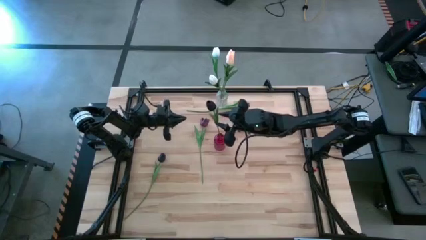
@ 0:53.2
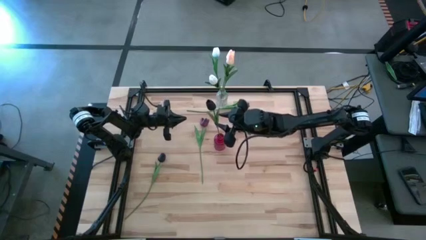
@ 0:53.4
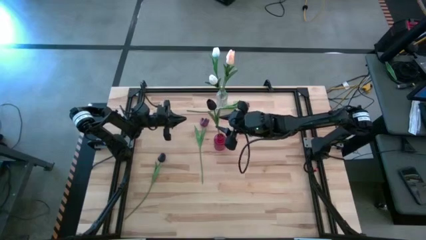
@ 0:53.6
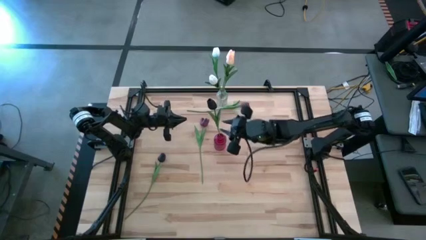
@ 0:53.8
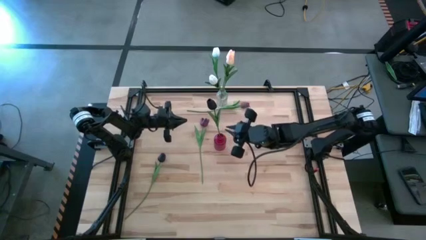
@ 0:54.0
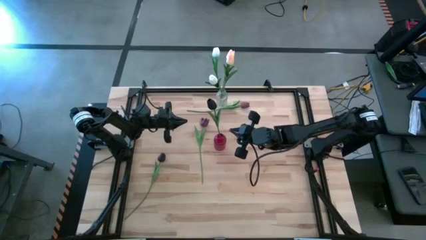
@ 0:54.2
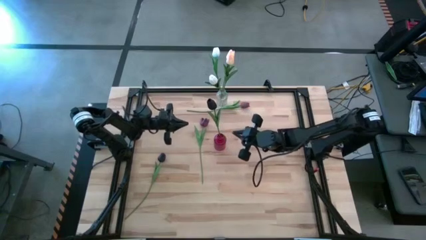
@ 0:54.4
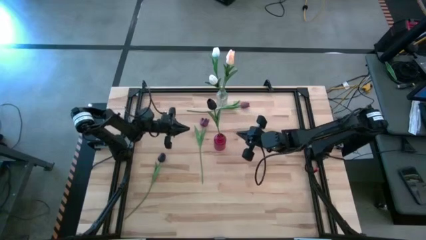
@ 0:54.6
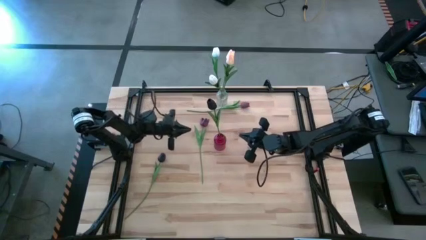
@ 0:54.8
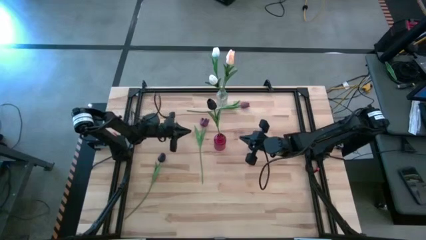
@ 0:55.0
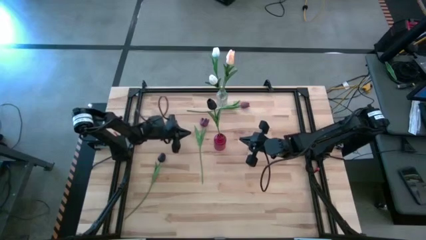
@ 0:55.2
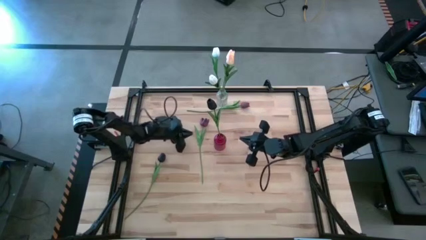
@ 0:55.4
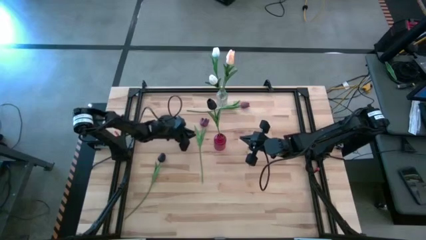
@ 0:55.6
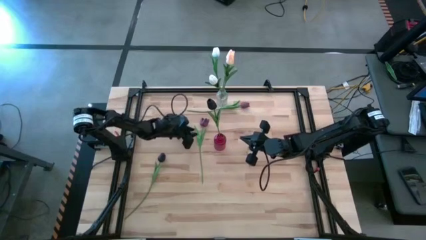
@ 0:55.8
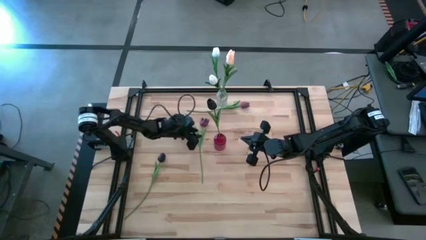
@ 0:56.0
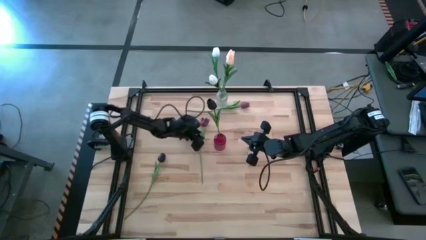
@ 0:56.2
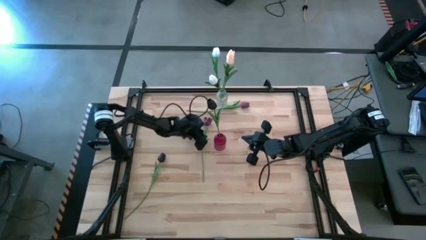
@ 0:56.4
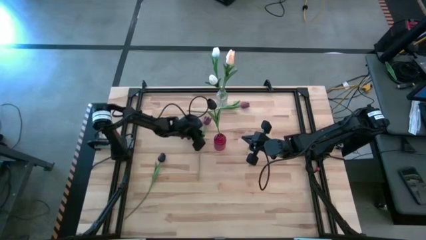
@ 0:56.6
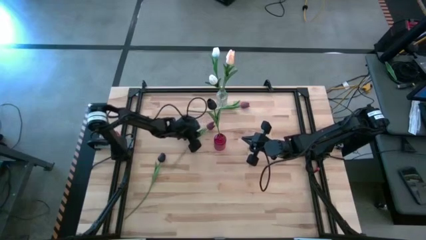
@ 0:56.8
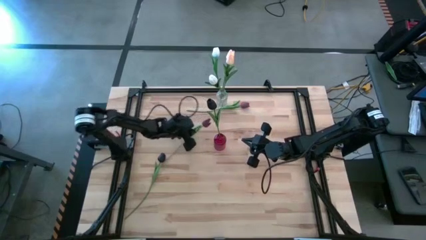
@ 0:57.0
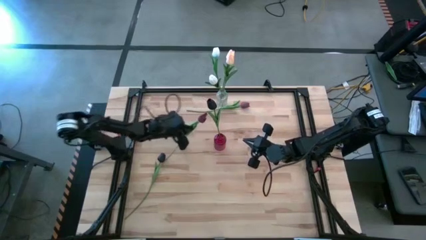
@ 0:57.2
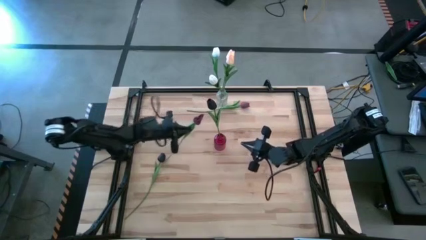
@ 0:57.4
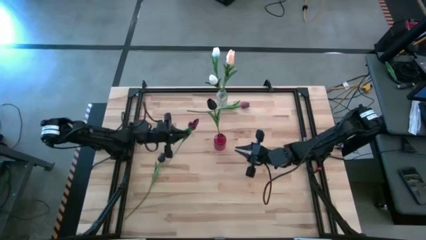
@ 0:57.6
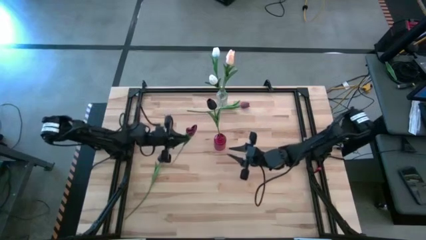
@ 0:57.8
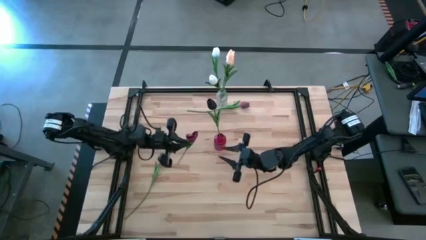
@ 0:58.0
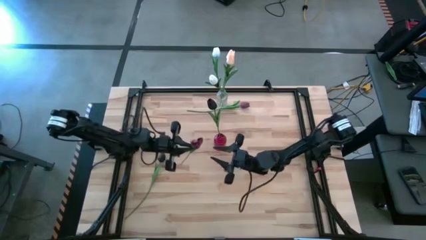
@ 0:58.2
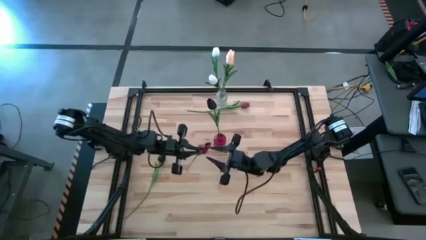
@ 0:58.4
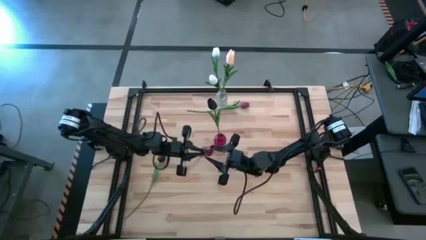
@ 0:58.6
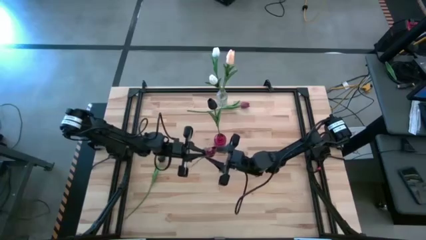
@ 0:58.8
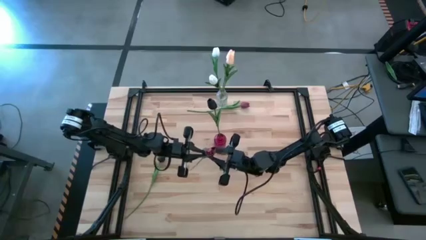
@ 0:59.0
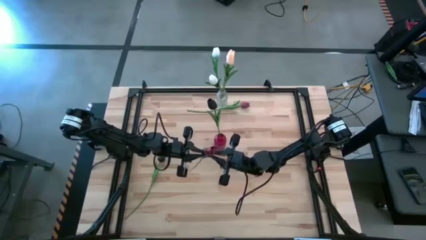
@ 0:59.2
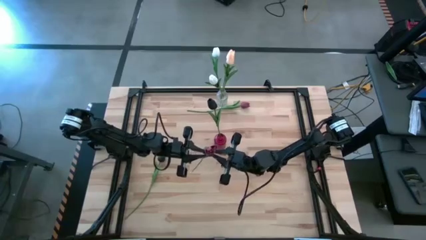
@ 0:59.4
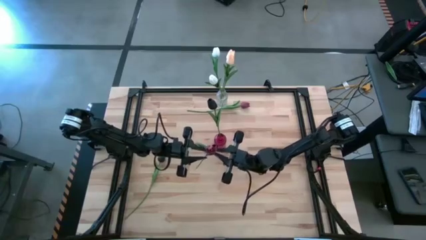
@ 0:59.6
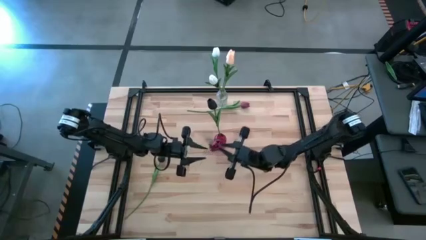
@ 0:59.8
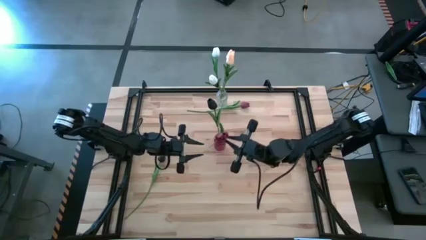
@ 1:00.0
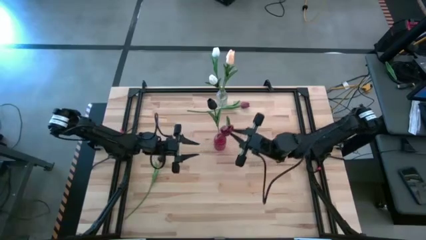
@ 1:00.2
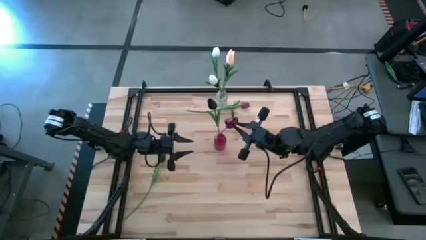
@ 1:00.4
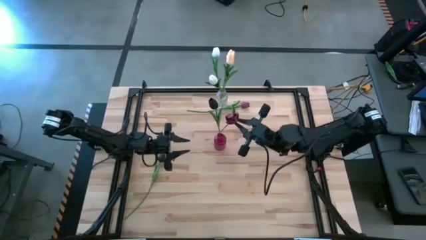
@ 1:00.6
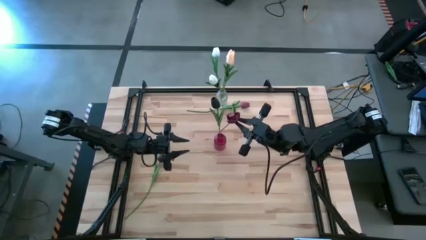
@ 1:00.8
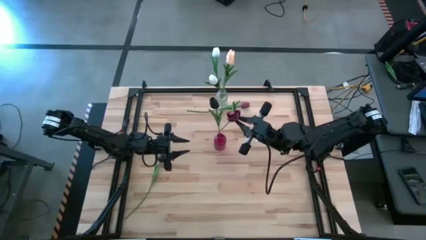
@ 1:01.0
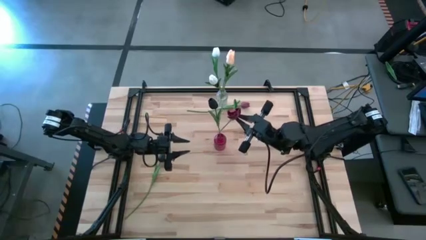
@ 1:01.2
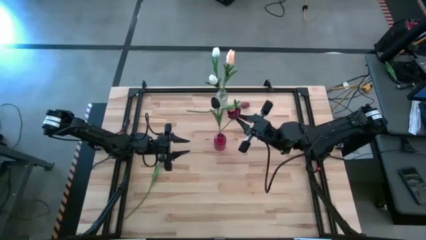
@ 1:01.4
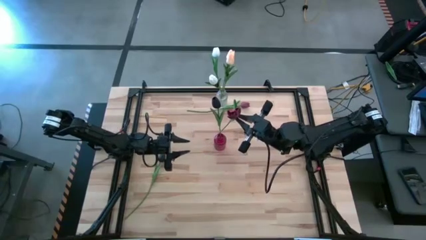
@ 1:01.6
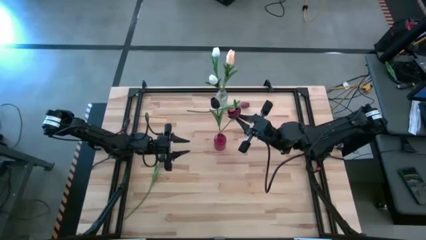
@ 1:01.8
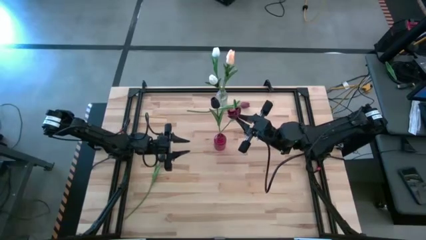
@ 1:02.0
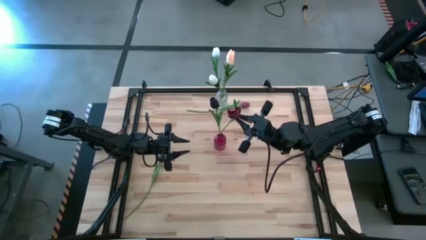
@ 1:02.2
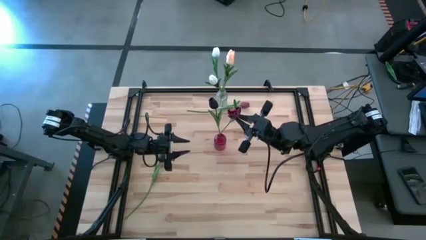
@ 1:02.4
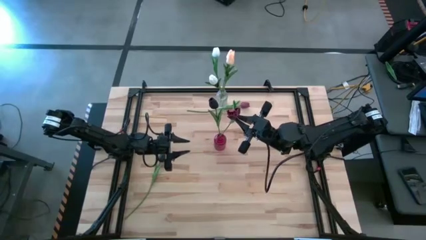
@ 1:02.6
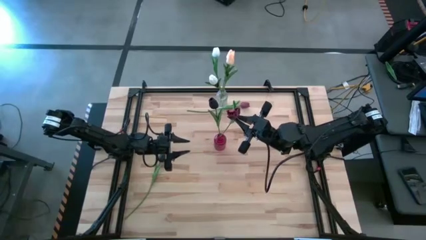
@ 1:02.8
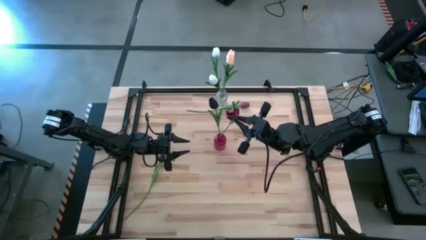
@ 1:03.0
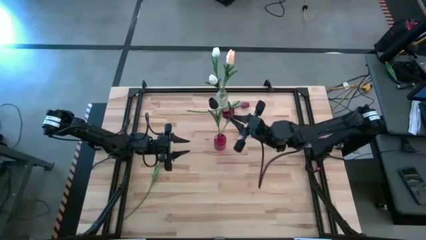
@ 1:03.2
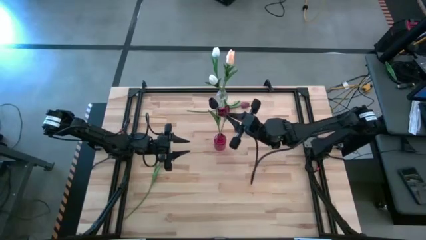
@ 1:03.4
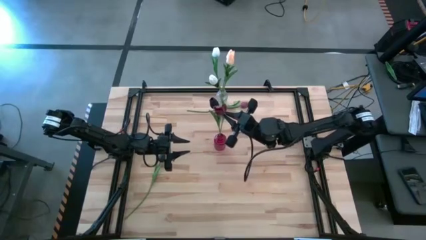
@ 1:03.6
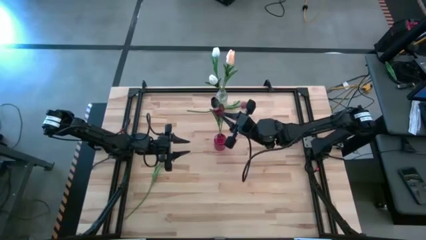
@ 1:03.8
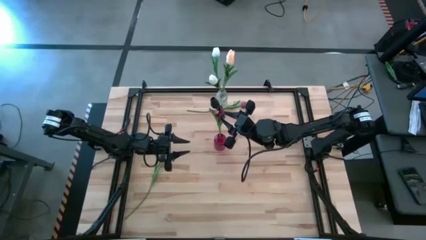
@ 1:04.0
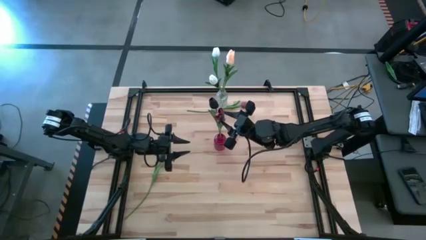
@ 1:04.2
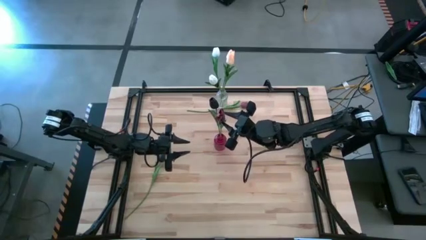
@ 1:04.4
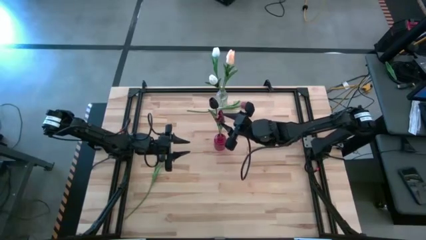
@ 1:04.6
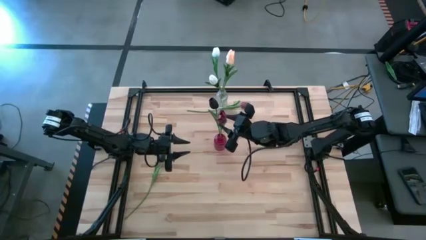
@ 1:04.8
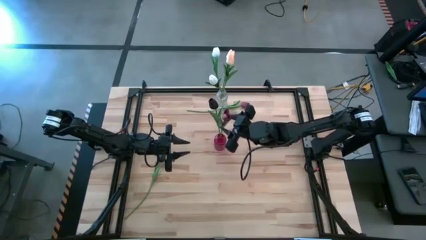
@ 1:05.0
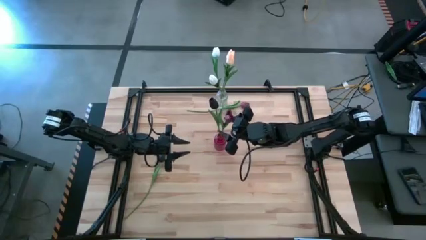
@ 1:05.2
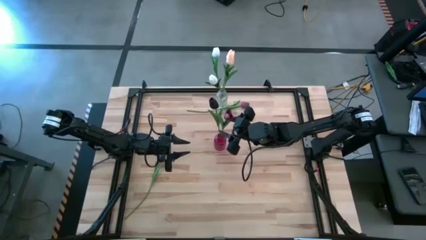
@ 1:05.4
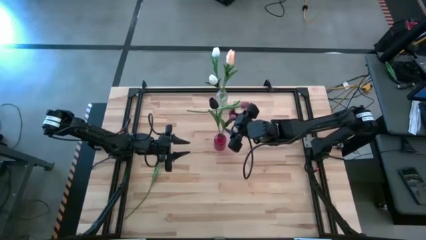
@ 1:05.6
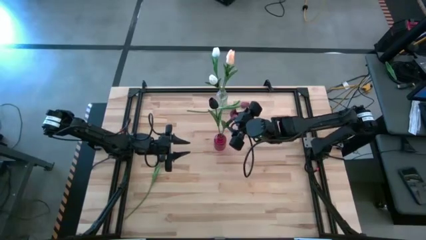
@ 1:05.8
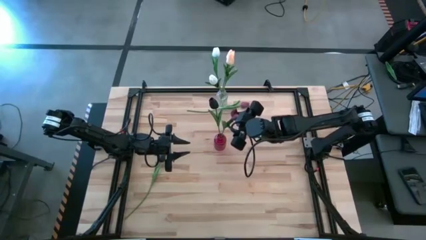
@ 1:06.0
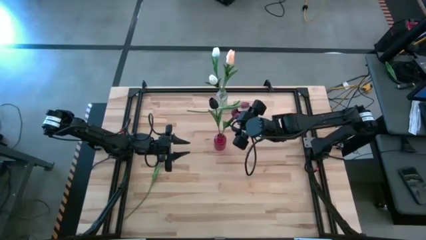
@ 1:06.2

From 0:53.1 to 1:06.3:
Task: Sort flowers into vase by color
Put the bottom red flower into the red vase
